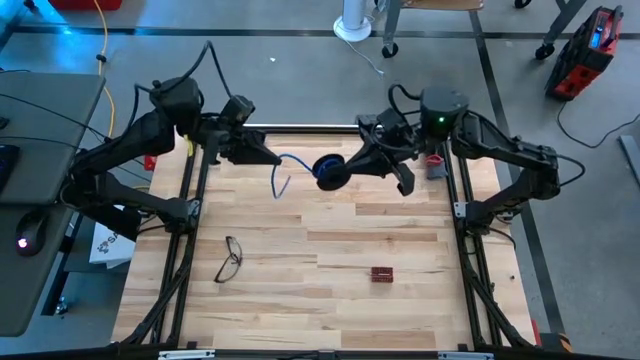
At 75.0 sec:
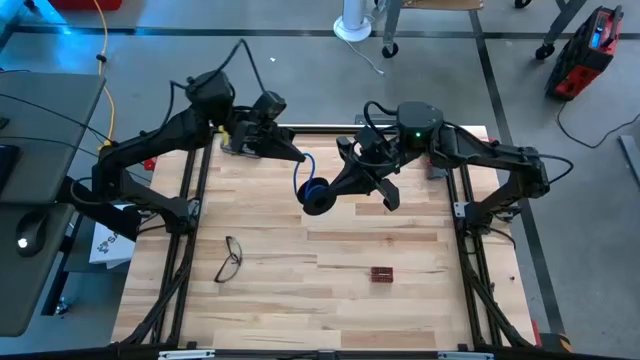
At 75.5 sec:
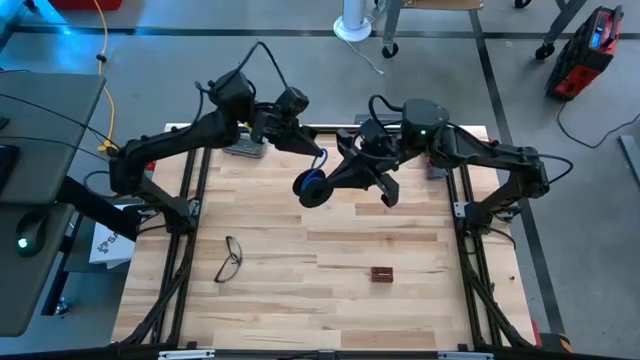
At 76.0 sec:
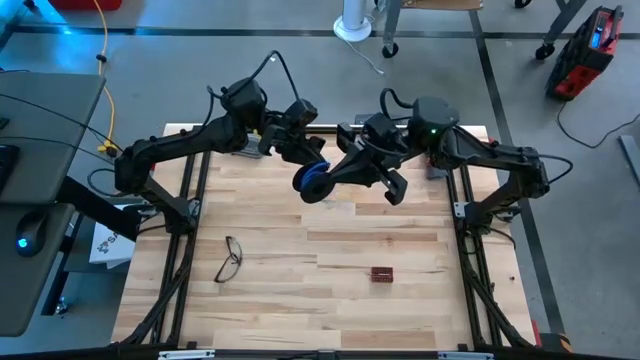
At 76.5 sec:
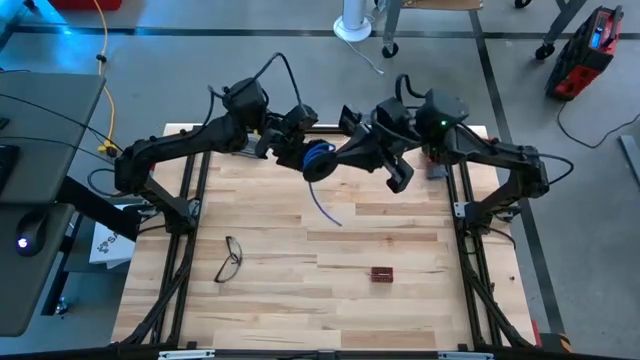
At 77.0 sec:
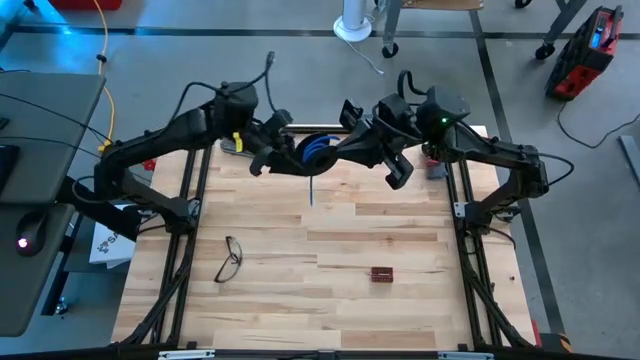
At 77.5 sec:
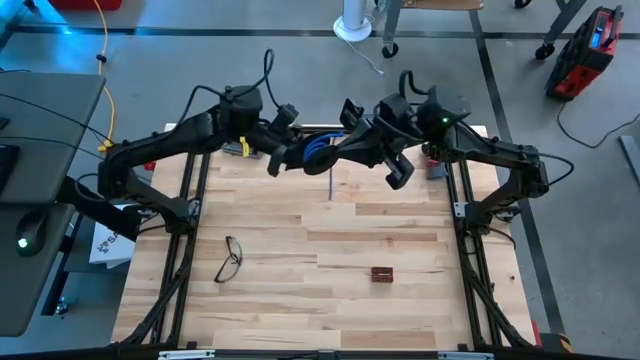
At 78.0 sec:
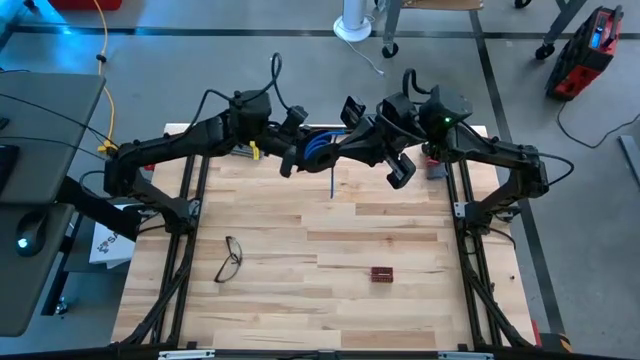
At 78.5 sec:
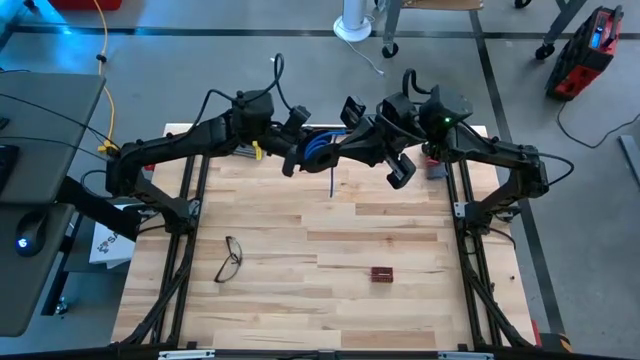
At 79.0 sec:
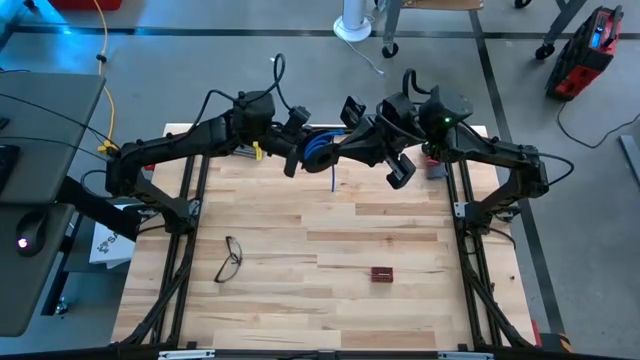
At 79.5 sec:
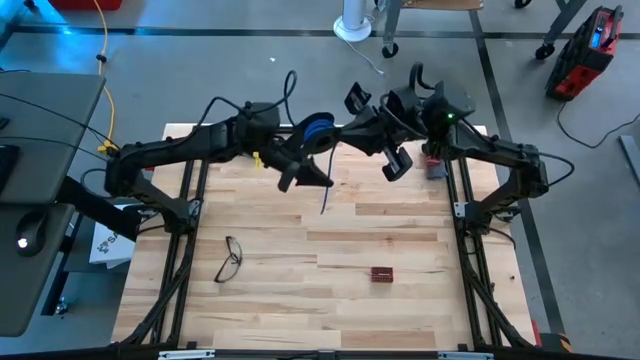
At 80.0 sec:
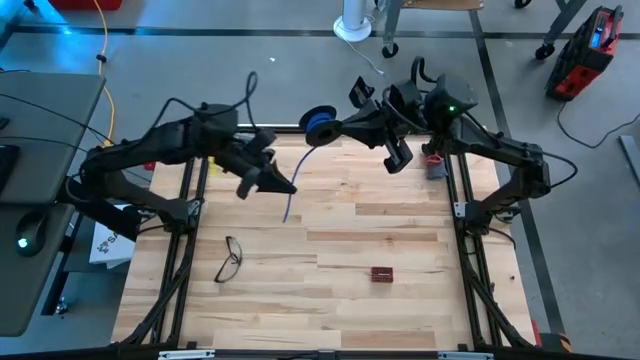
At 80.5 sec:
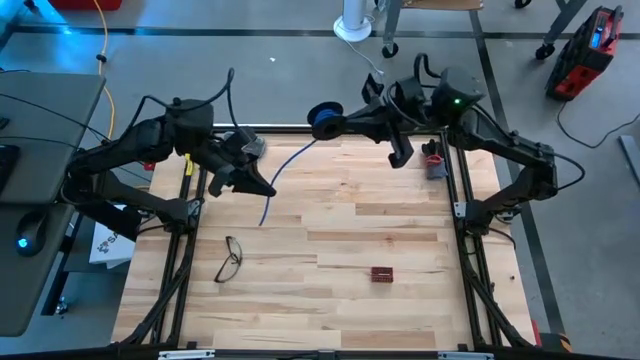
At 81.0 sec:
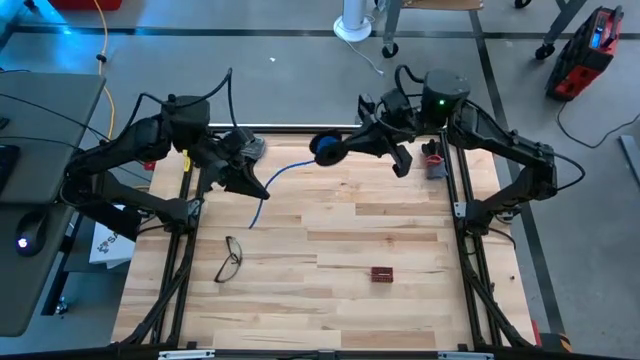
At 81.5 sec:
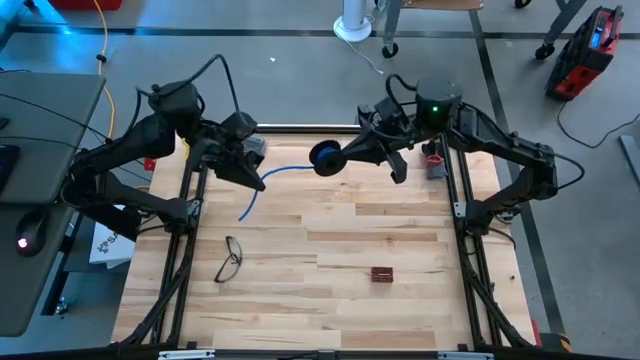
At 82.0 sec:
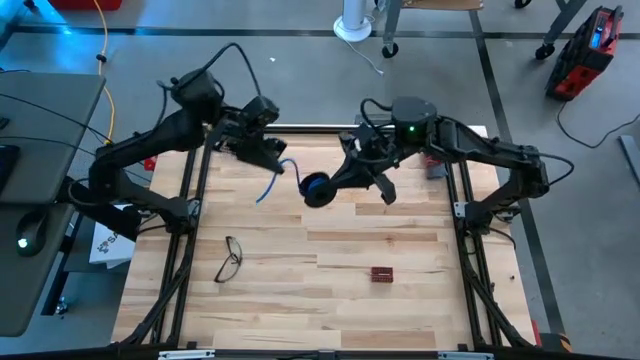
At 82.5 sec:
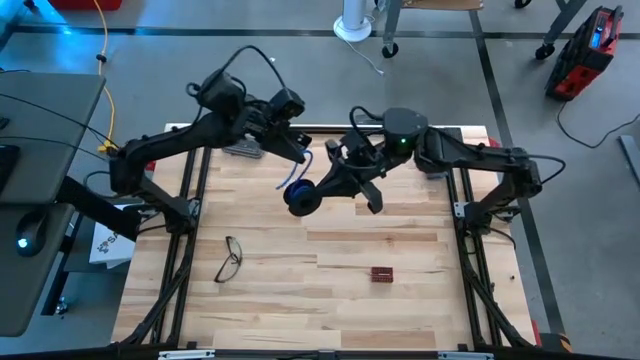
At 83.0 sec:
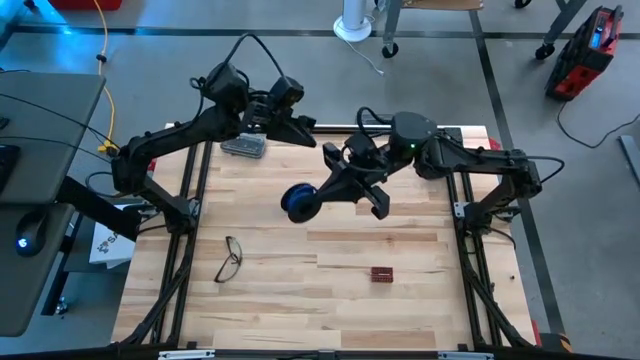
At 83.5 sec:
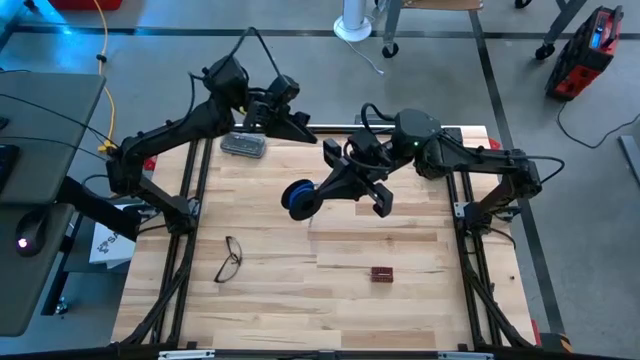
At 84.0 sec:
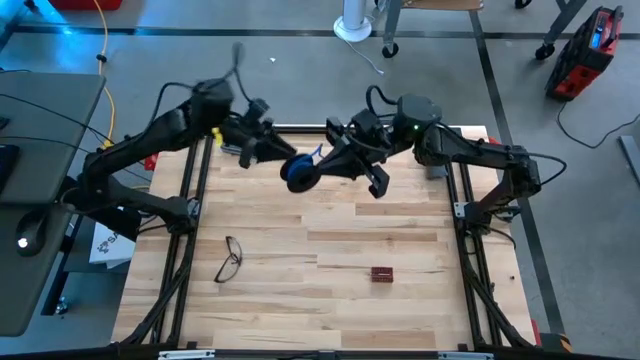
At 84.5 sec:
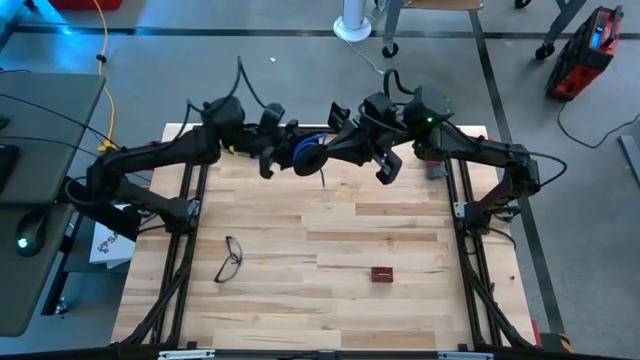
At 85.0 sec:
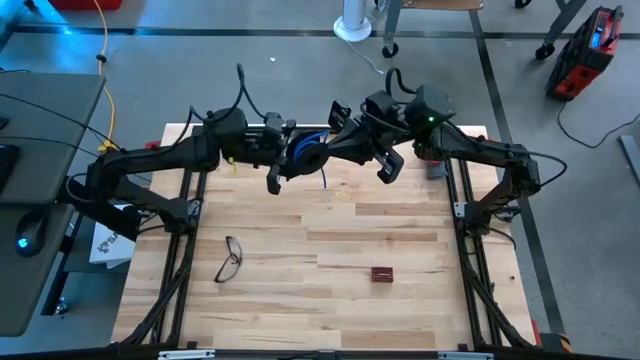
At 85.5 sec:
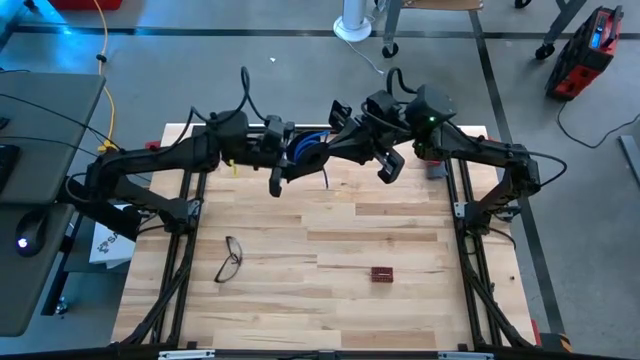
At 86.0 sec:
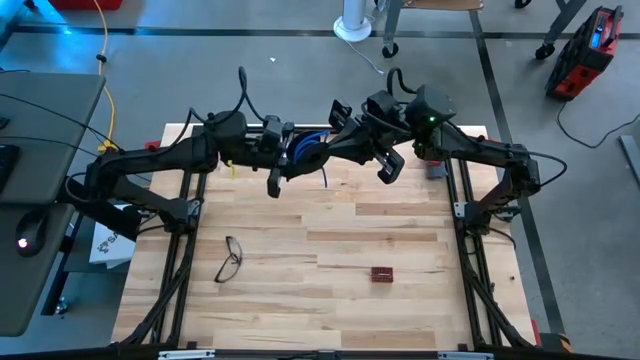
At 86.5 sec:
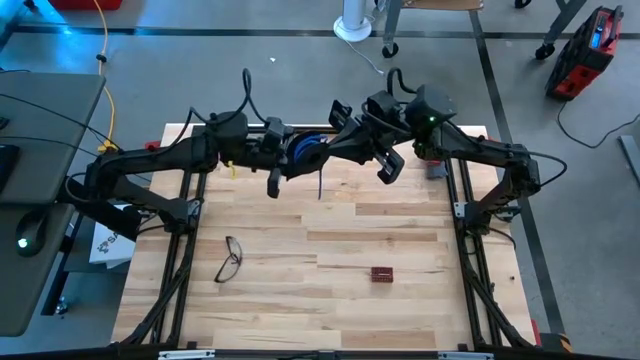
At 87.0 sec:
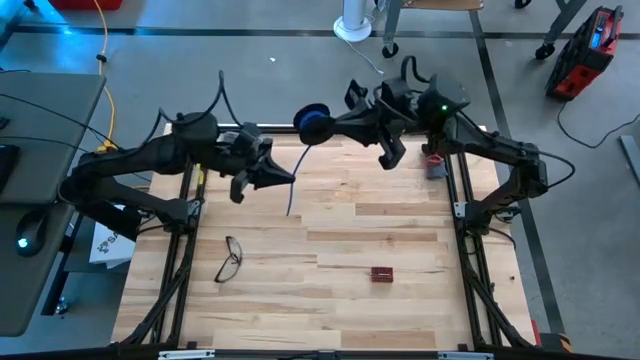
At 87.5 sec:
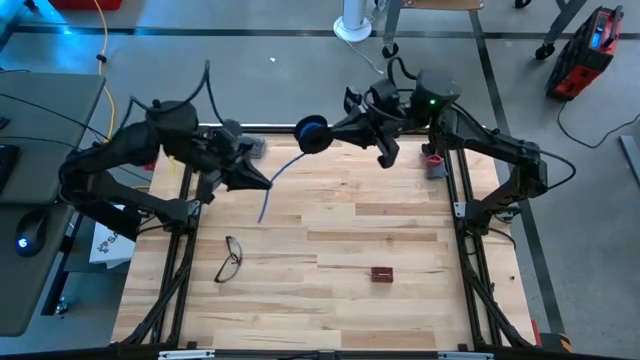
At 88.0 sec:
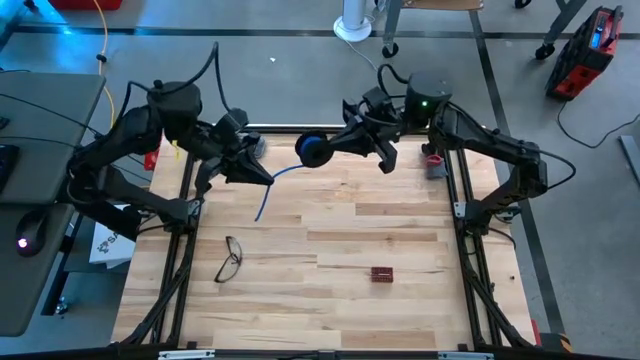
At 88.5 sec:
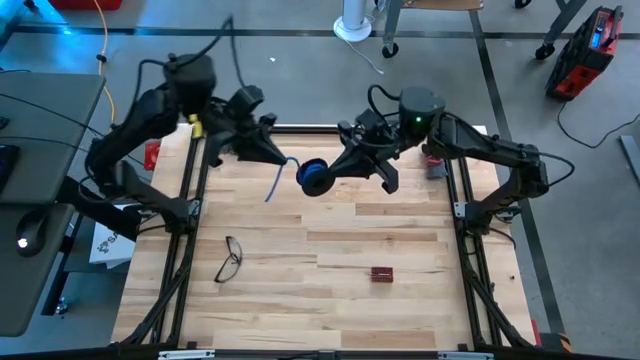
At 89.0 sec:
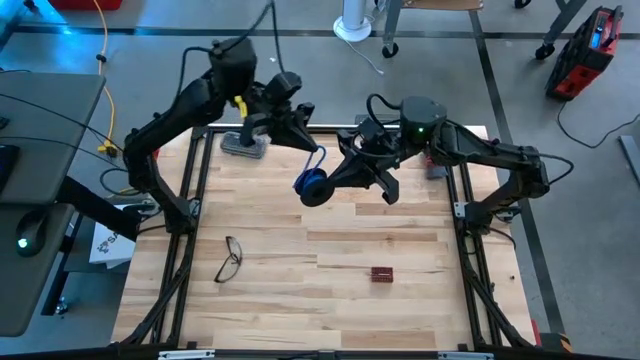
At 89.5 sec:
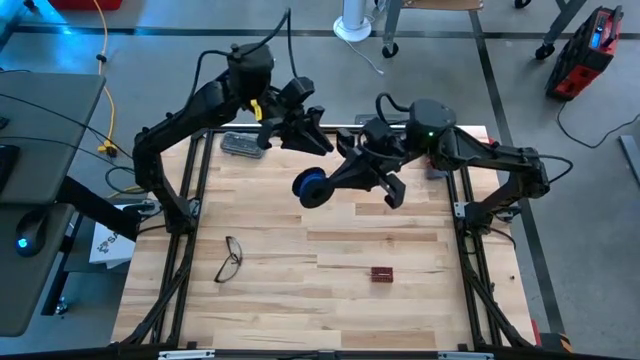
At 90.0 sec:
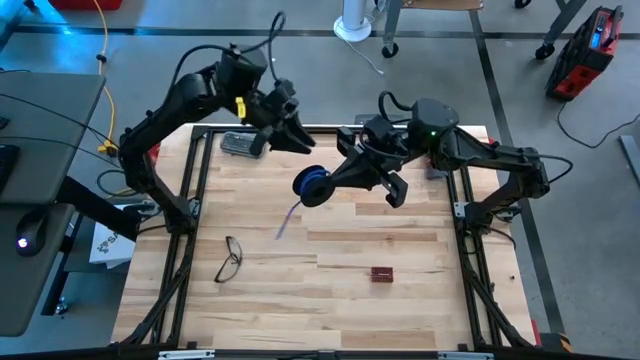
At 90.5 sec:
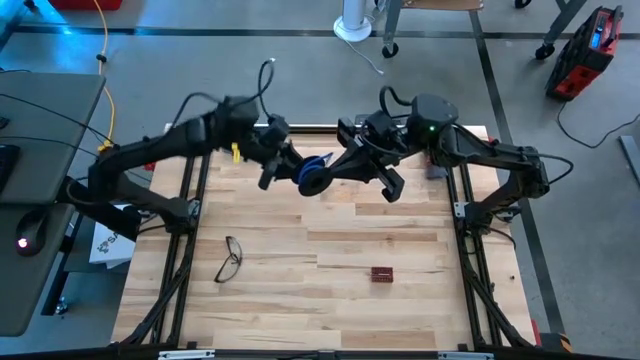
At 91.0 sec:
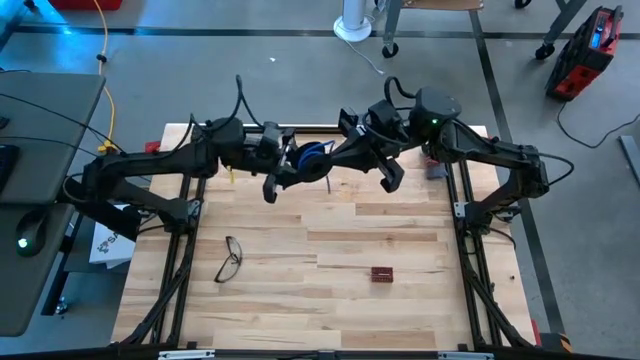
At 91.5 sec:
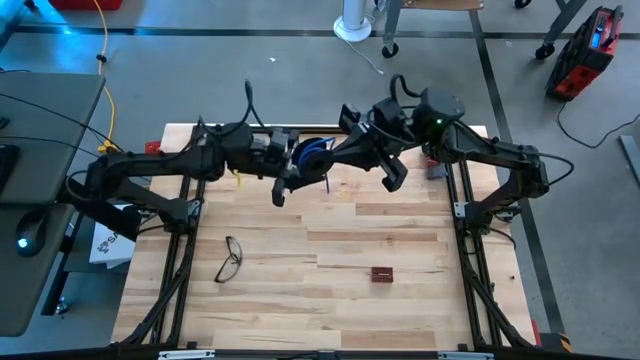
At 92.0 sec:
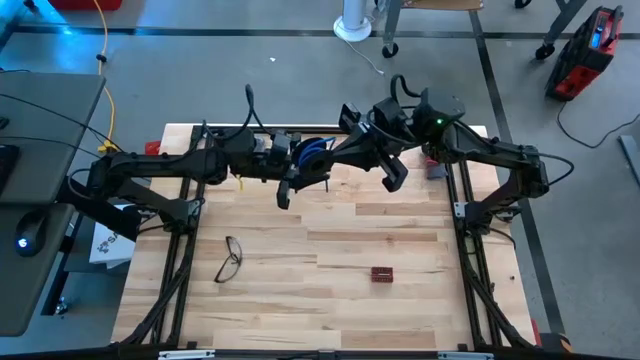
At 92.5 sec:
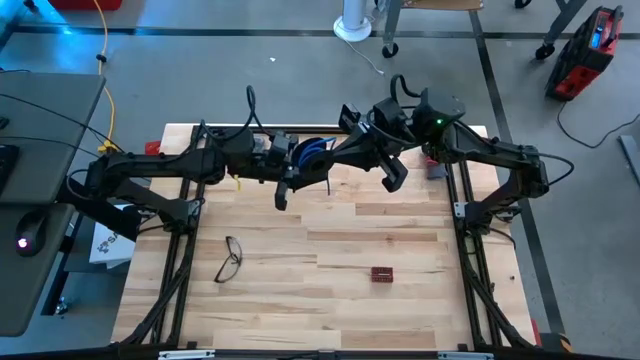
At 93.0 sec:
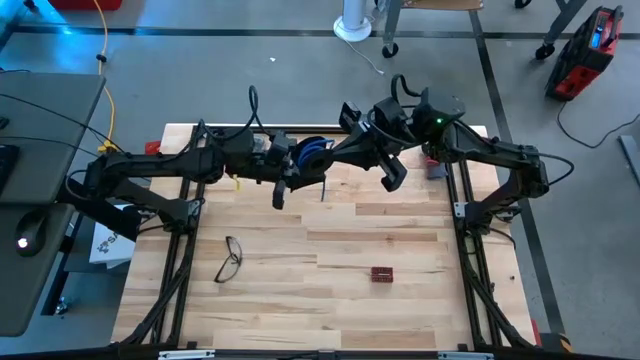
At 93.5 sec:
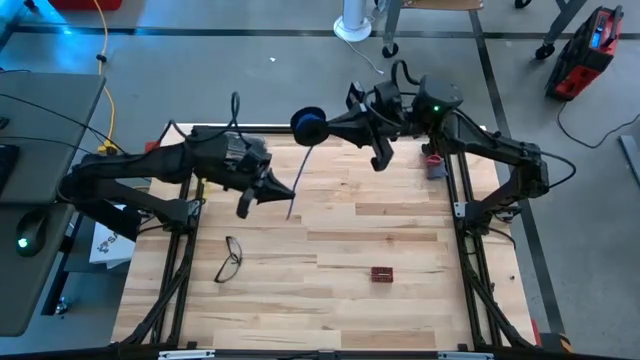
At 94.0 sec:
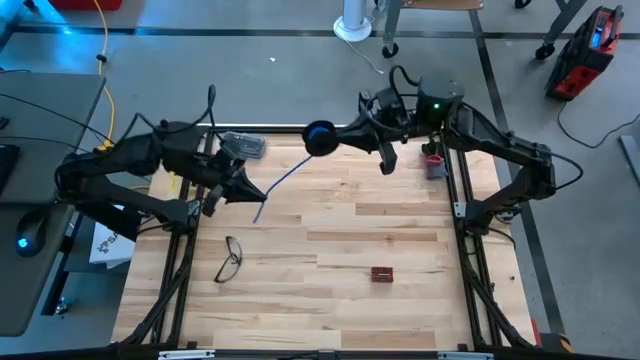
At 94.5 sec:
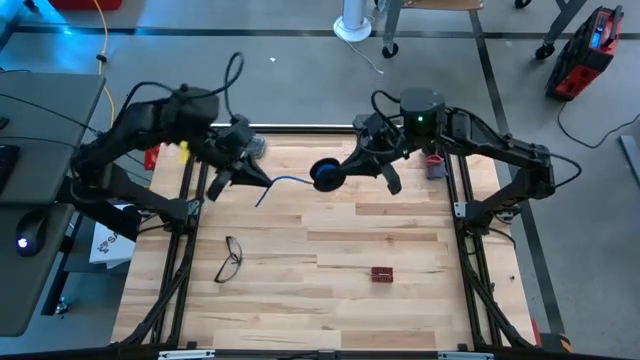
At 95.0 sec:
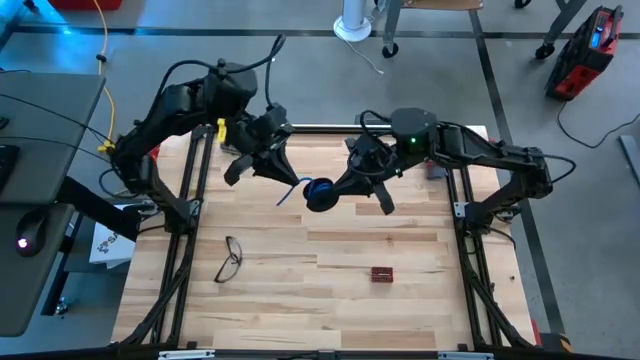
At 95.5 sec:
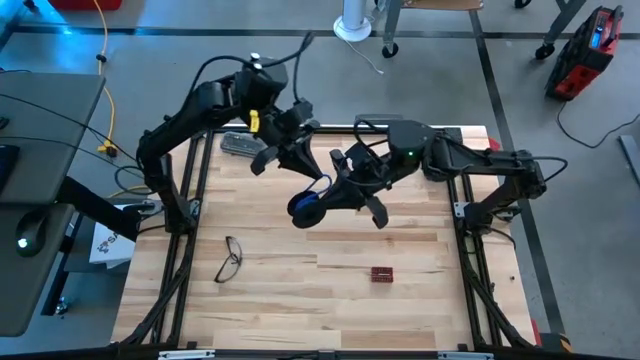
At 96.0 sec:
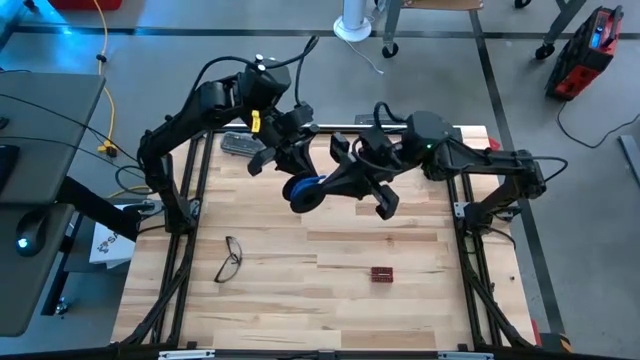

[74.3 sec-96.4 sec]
Task: Coil cords
Coil the blue wire onto the spool
